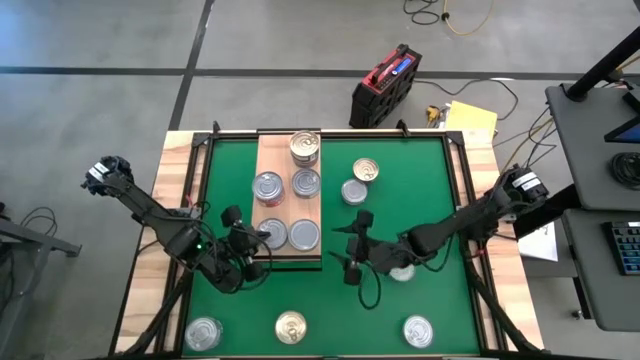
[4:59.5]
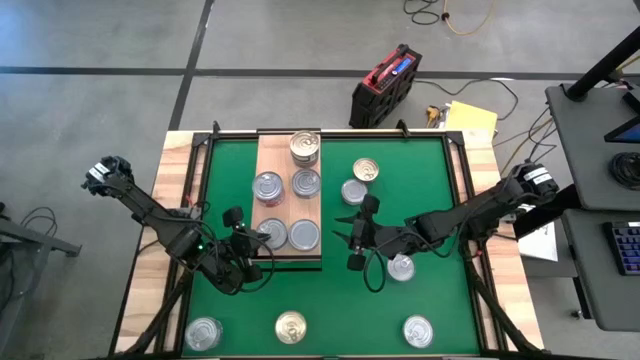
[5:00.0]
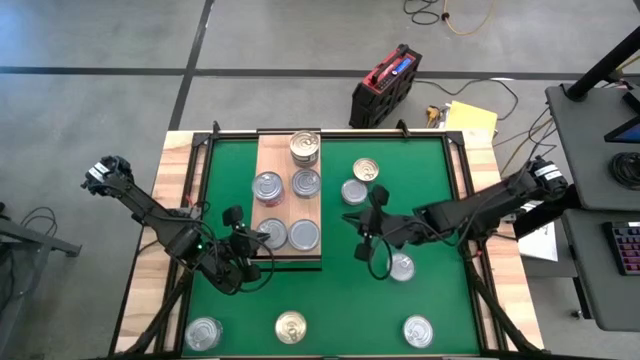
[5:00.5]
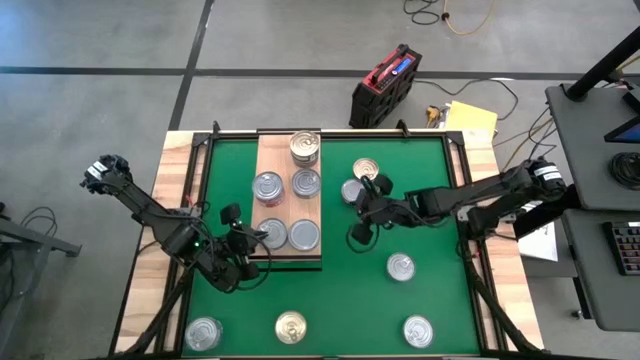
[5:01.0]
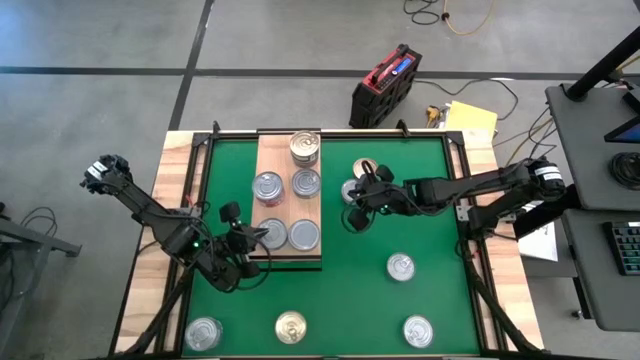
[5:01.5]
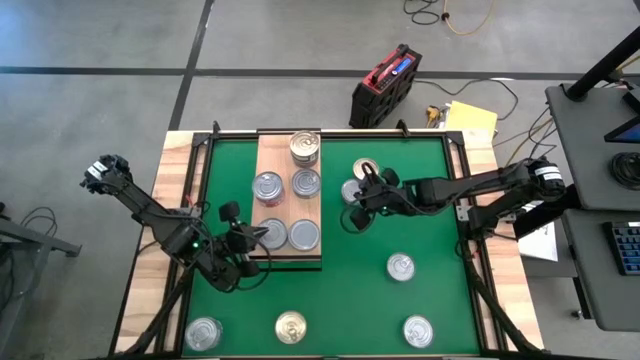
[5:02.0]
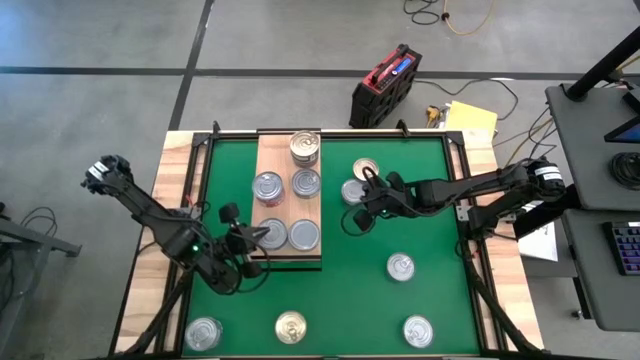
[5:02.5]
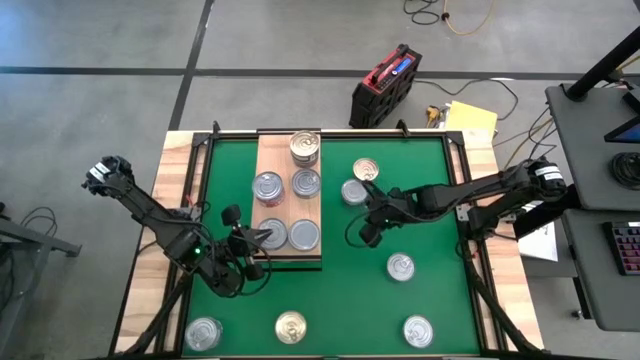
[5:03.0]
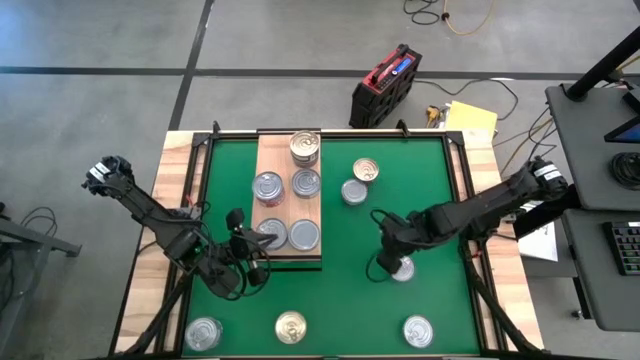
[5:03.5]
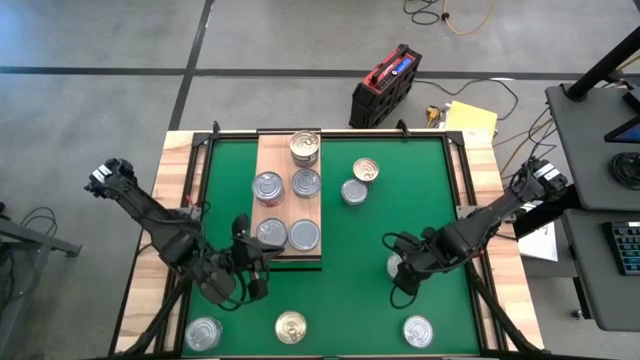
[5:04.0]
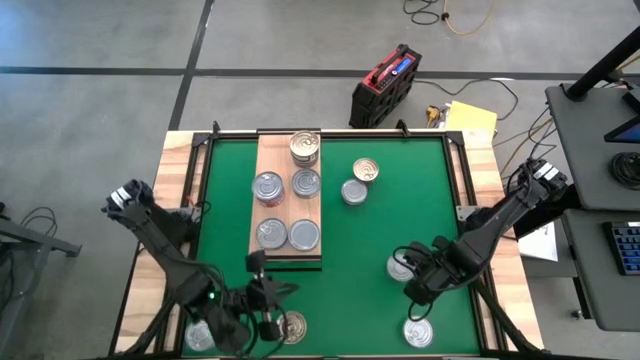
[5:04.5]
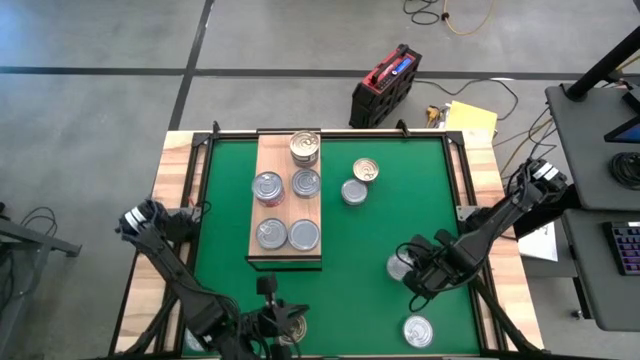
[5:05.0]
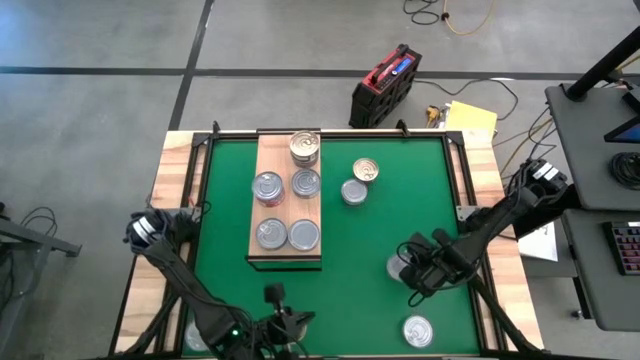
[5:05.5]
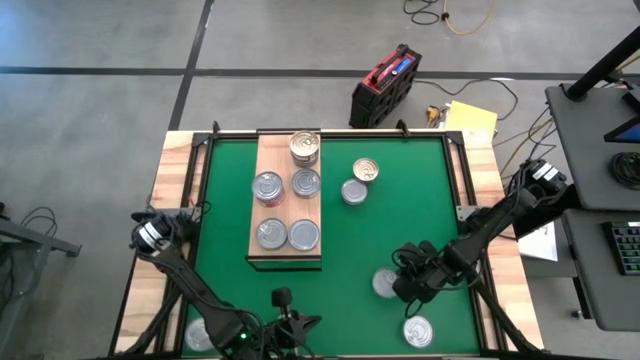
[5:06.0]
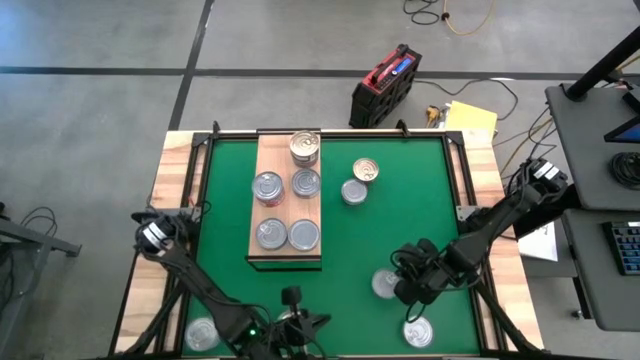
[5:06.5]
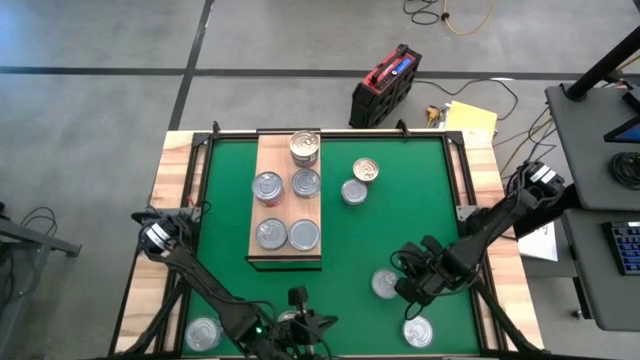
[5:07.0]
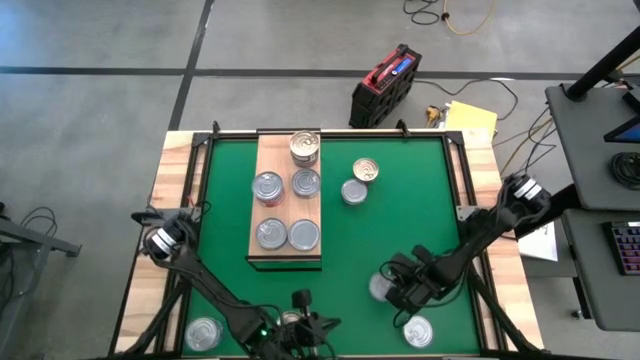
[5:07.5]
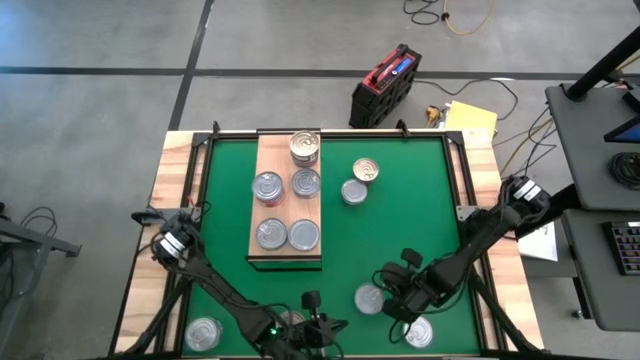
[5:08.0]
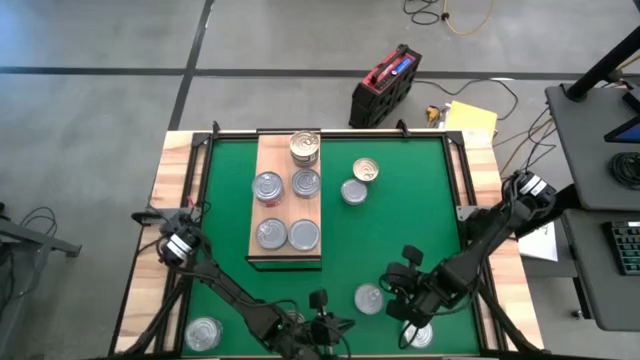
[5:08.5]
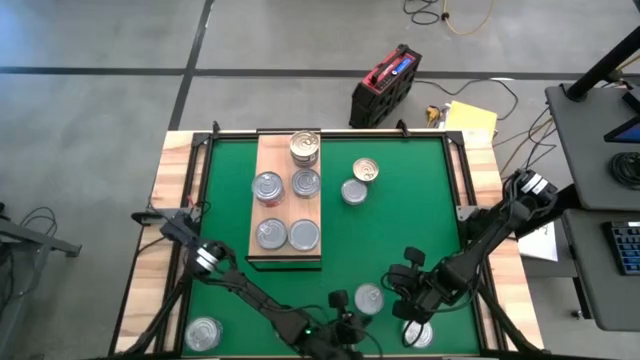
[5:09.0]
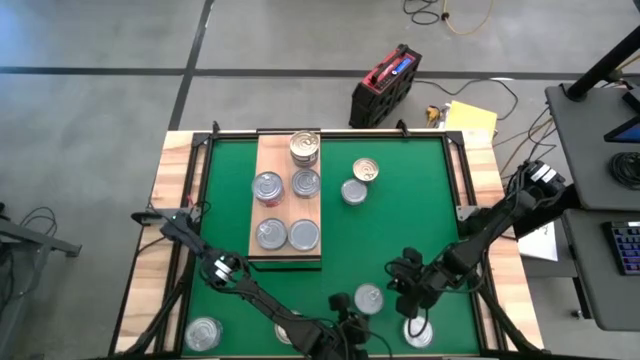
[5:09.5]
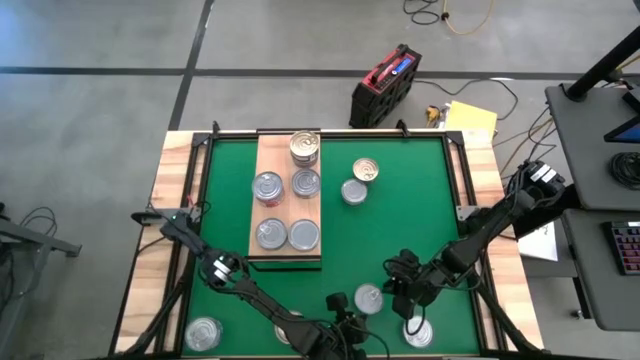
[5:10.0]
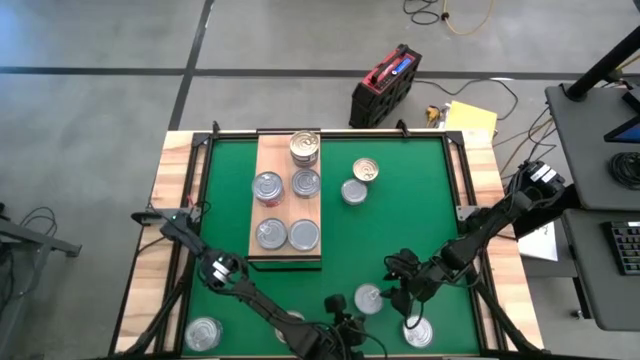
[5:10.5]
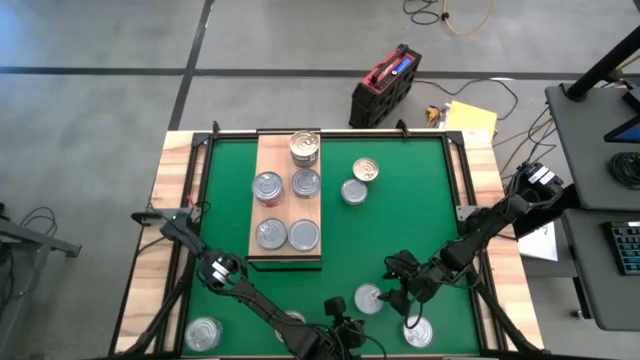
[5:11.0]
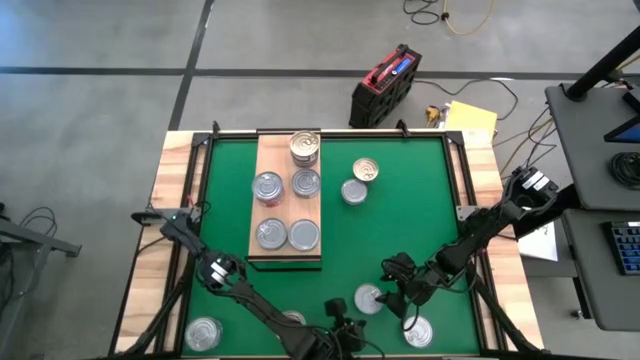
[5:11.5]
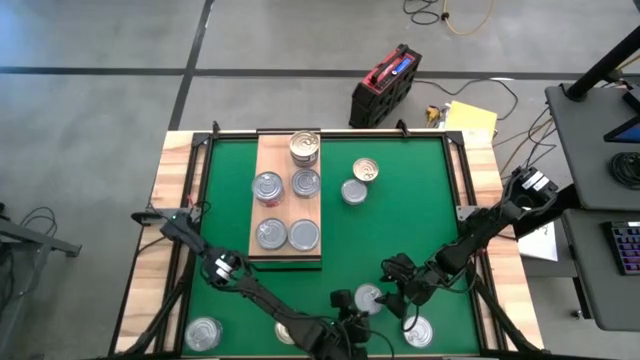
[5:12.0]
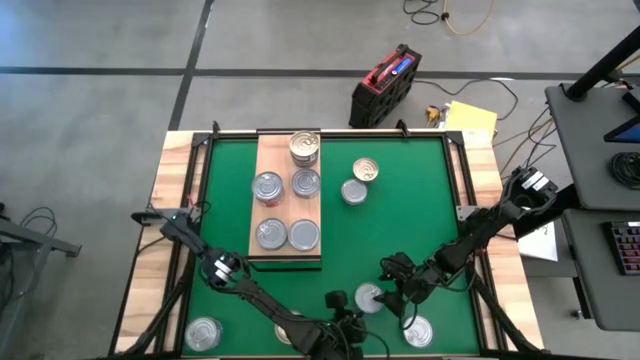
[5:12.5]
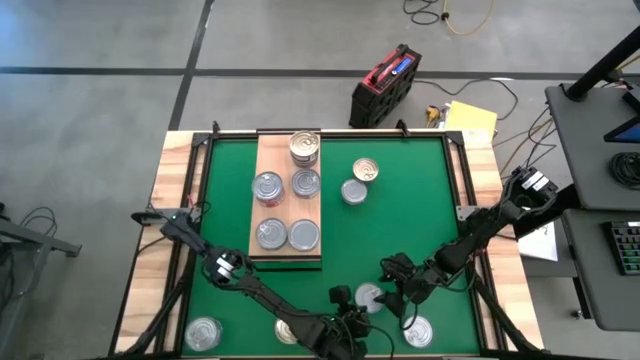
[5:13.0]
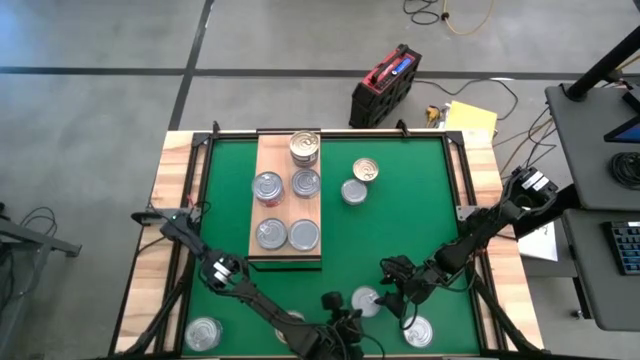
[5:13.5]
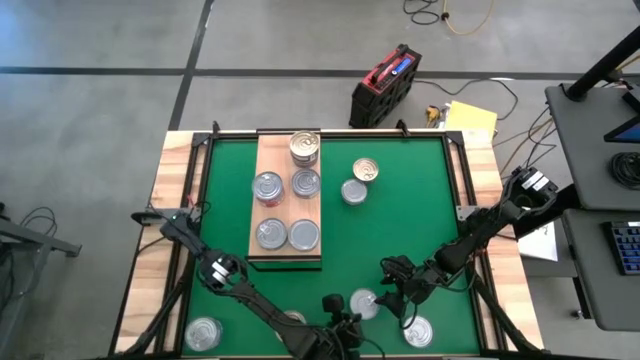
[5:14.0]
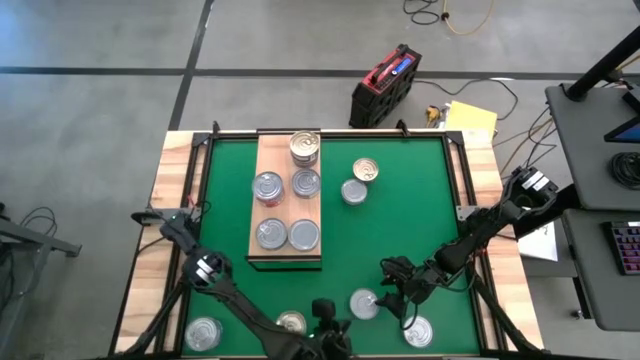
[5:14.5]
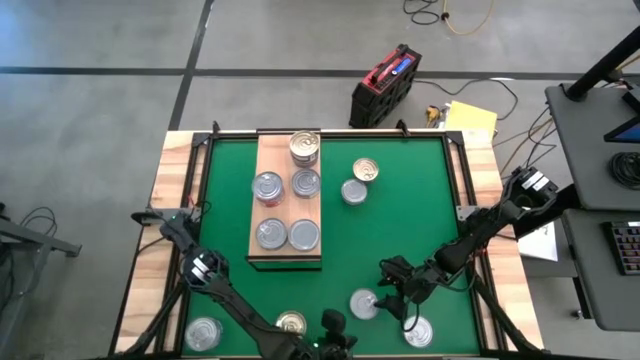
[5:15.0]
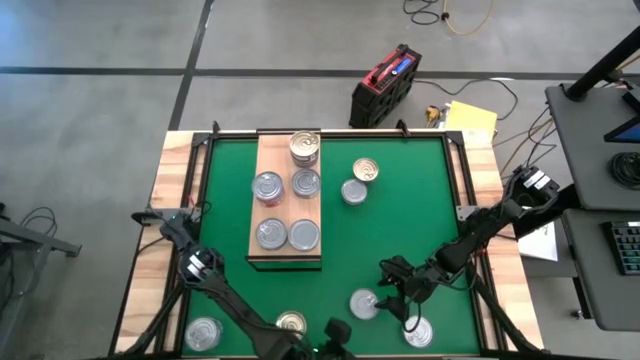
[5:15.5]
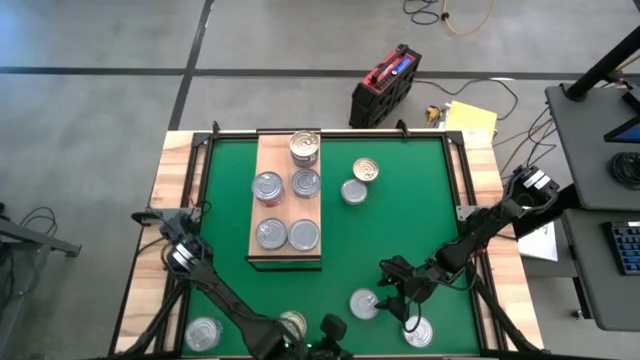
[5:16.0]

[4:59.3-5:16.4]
Task: Stack canned seafood by type on shelf
Stack the green and blue tuna can on top of the green and blue tuna can on the shelf

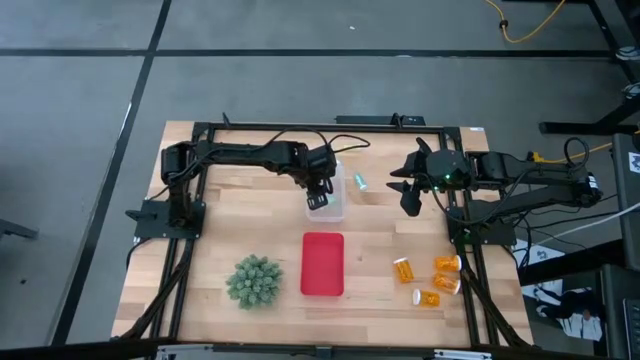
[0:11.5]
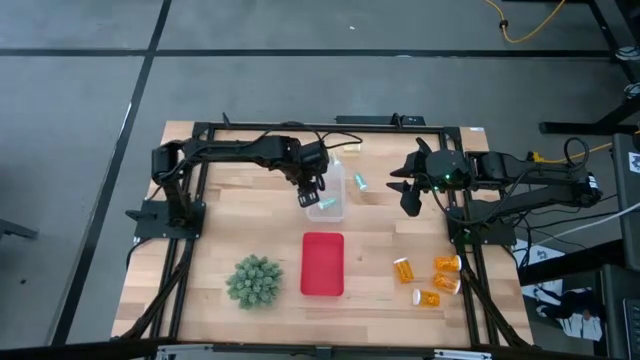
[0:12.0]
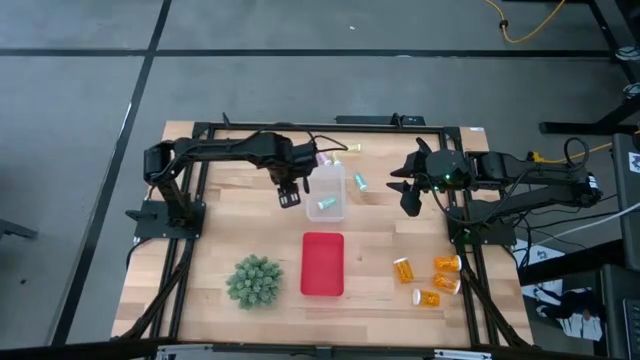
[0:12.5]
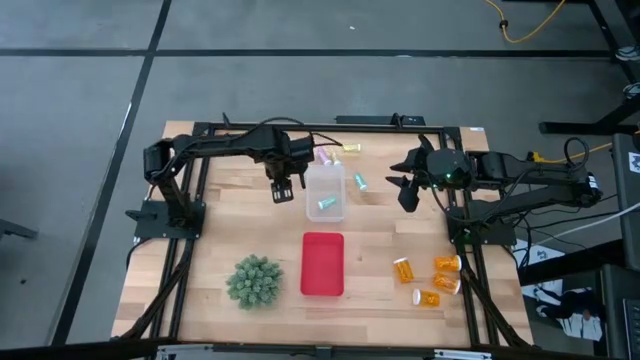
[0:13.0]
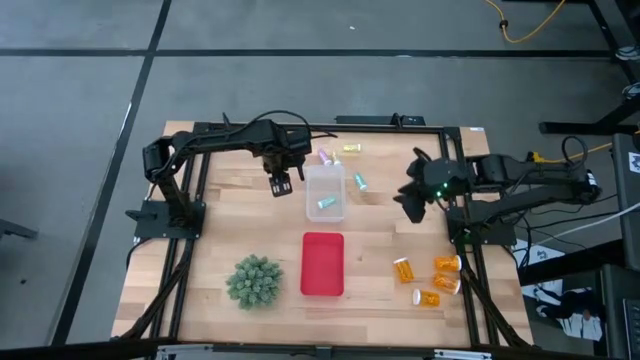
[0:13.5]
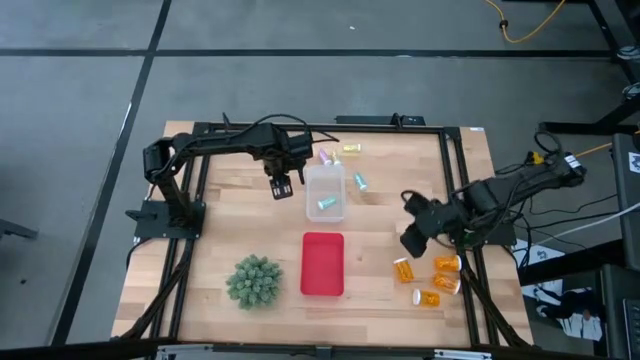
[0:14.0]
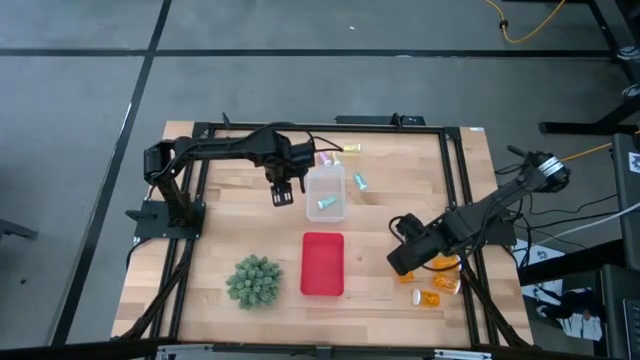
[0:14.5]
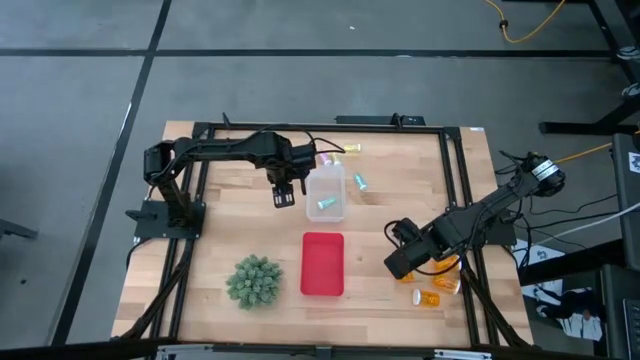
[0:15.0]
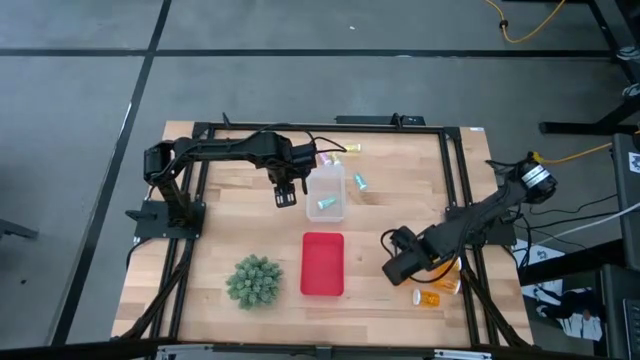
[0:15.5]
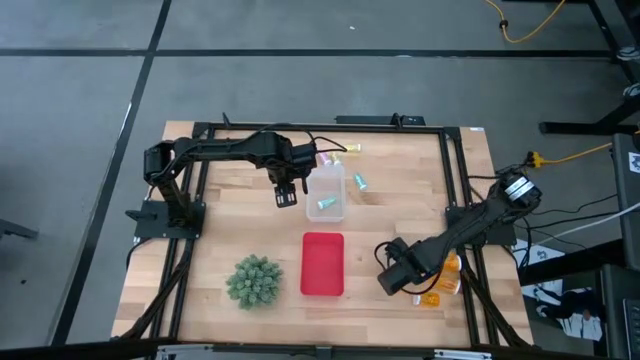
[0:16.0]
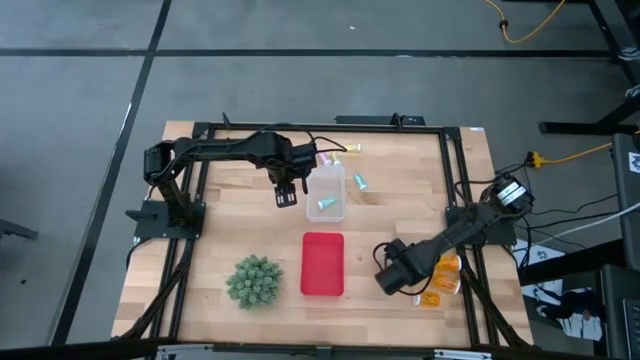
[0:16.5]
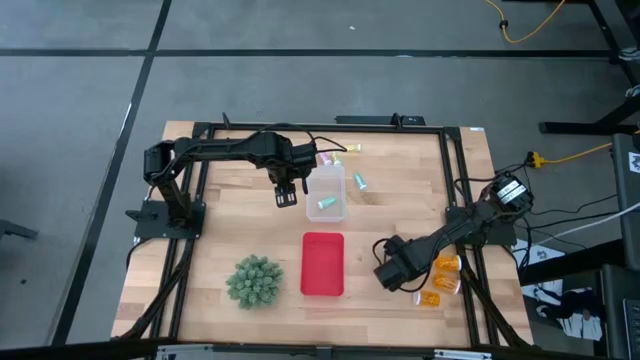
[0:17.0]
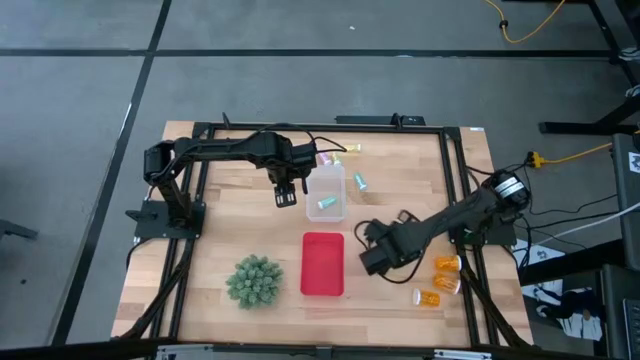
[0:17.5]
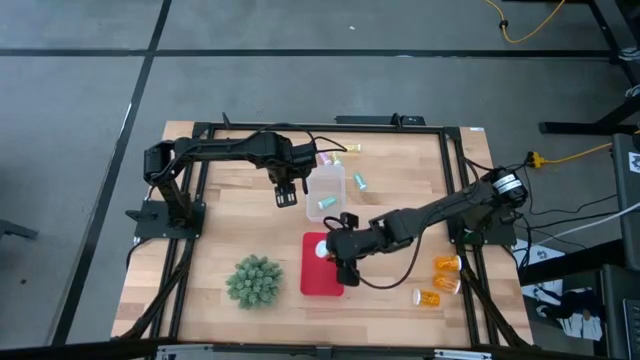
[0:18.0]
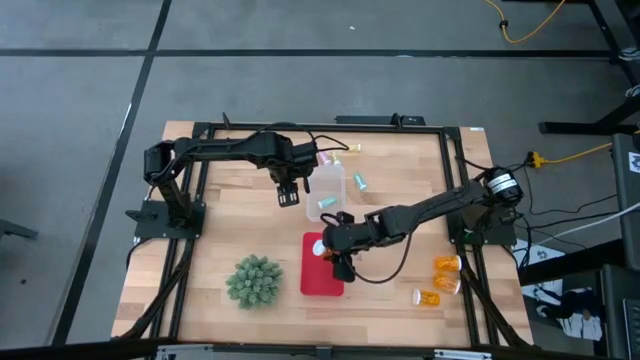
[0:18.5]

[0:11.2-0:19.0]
Task: Pick and place medicine bottles into bin by pill shape (circle, oval)
Put the top left big orange pill bottle into the red bin
